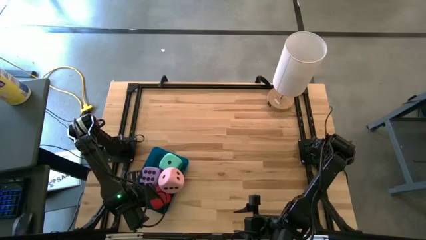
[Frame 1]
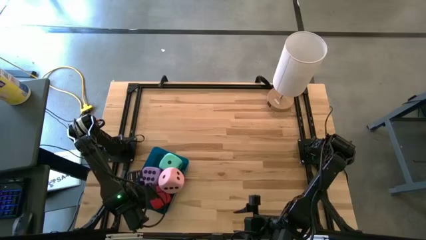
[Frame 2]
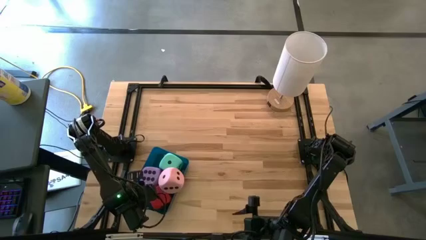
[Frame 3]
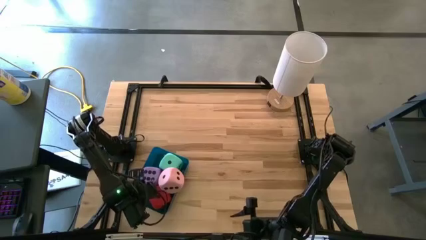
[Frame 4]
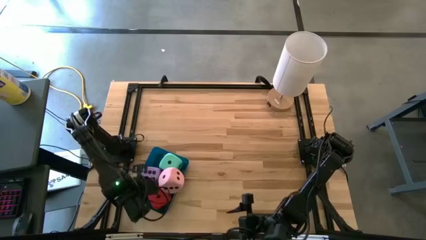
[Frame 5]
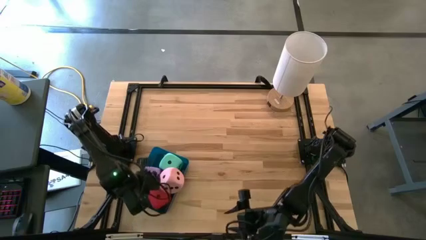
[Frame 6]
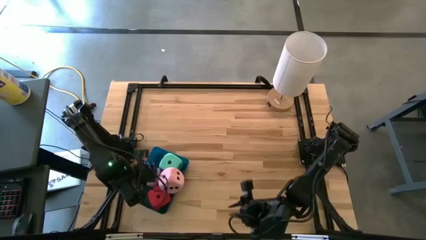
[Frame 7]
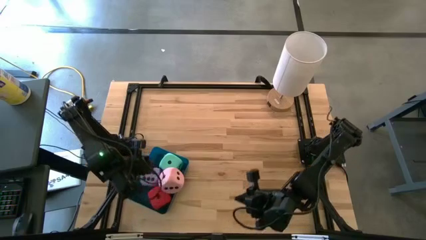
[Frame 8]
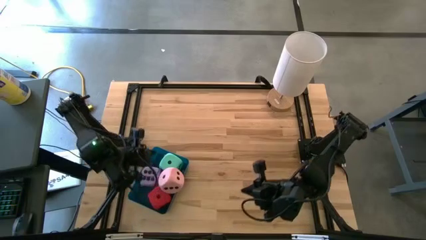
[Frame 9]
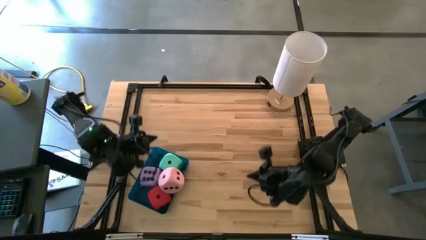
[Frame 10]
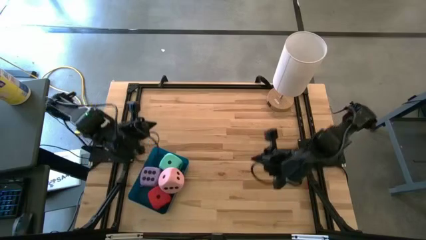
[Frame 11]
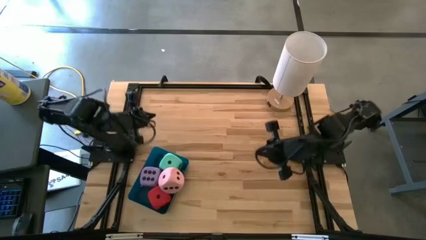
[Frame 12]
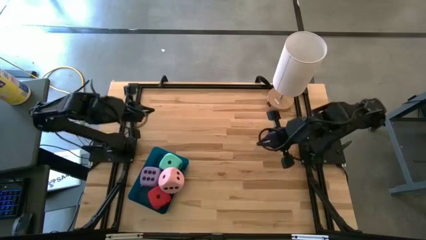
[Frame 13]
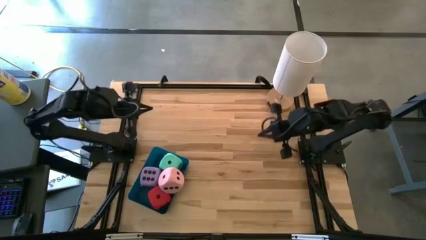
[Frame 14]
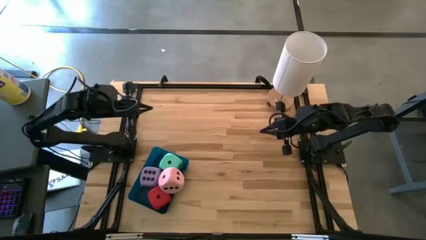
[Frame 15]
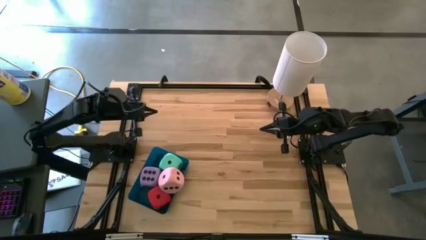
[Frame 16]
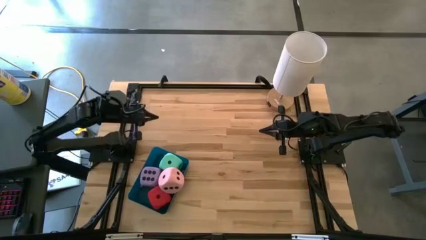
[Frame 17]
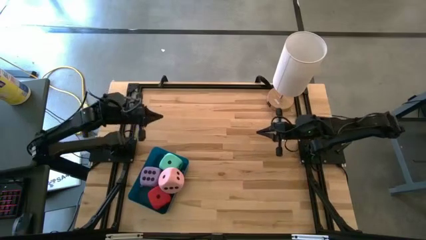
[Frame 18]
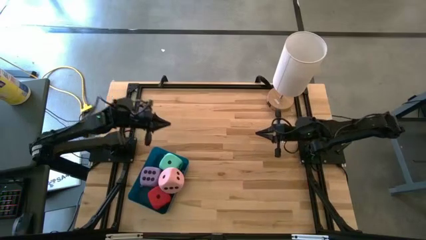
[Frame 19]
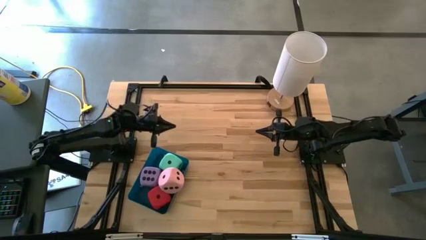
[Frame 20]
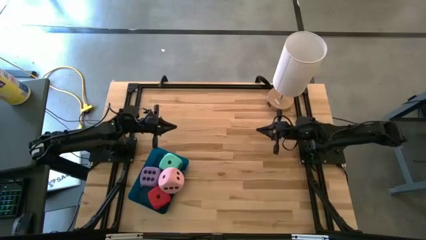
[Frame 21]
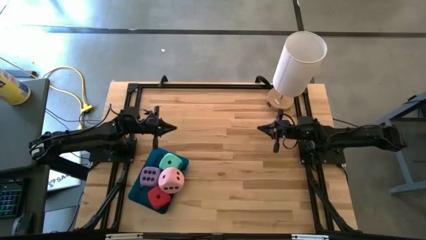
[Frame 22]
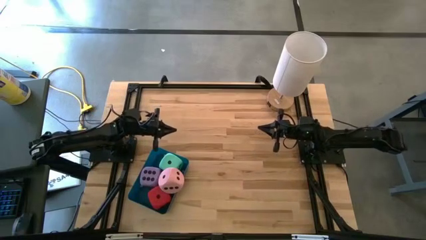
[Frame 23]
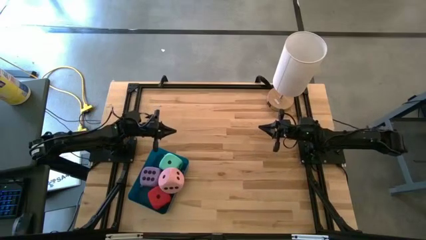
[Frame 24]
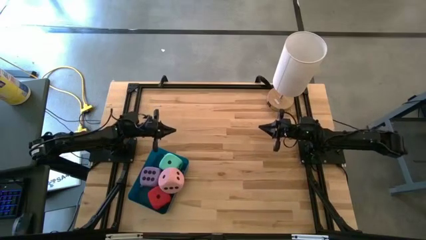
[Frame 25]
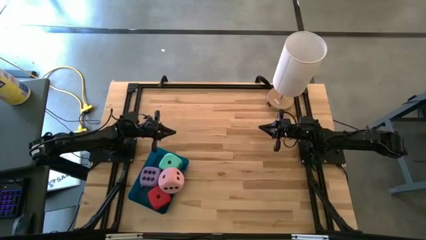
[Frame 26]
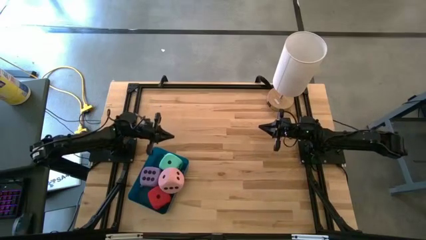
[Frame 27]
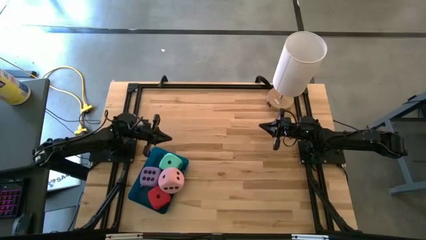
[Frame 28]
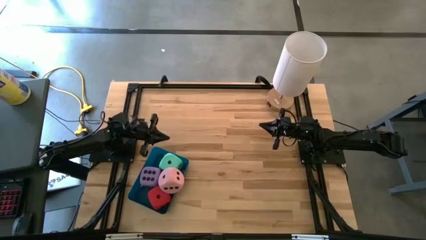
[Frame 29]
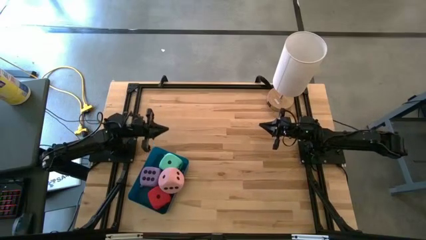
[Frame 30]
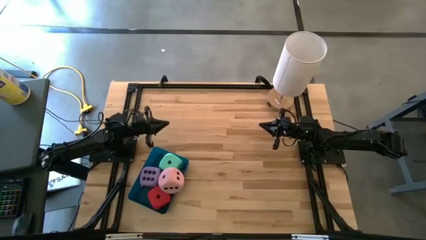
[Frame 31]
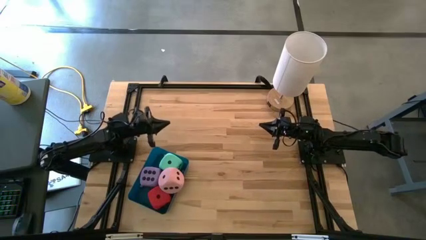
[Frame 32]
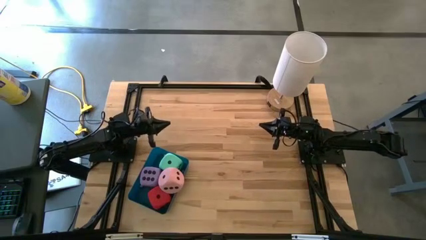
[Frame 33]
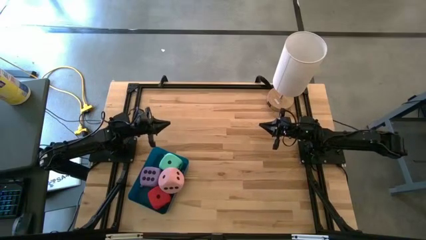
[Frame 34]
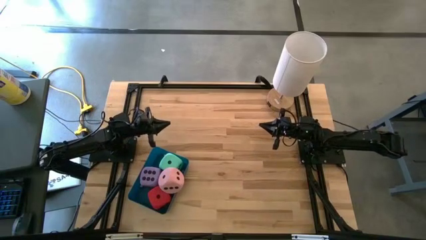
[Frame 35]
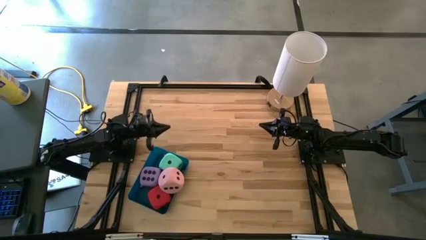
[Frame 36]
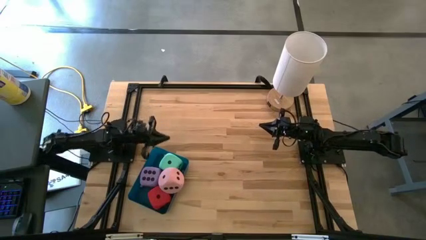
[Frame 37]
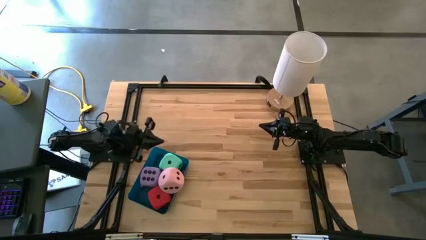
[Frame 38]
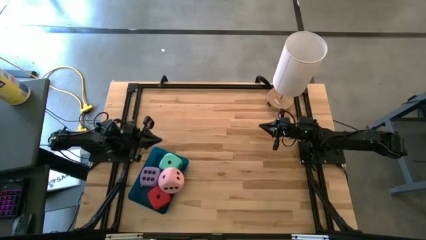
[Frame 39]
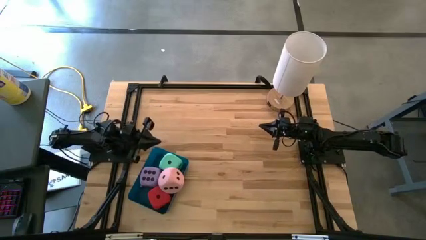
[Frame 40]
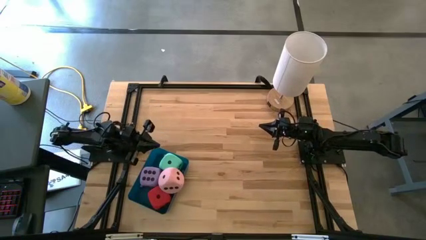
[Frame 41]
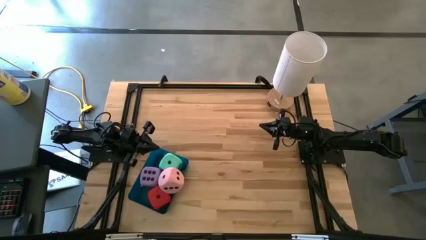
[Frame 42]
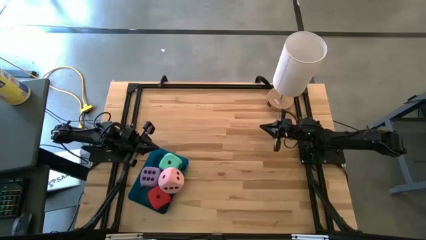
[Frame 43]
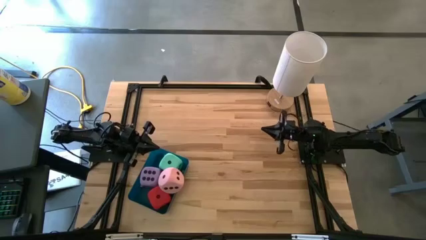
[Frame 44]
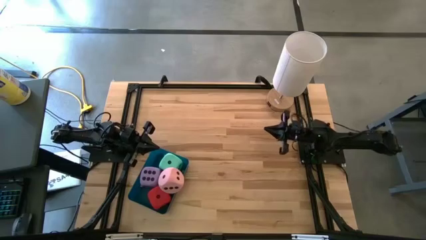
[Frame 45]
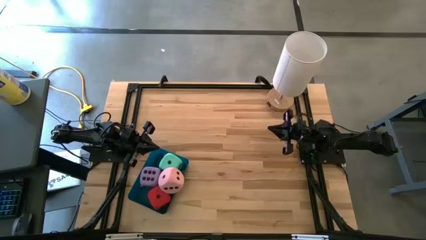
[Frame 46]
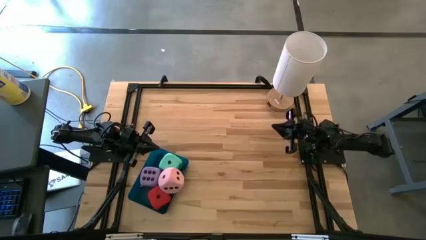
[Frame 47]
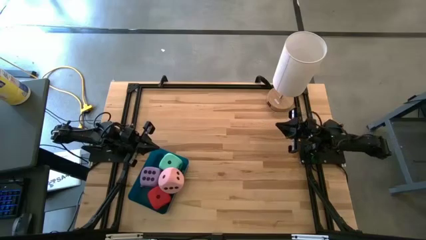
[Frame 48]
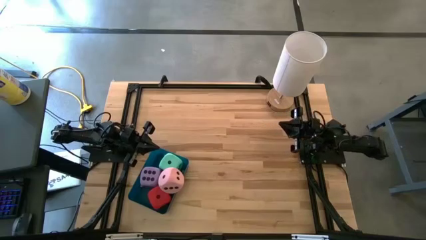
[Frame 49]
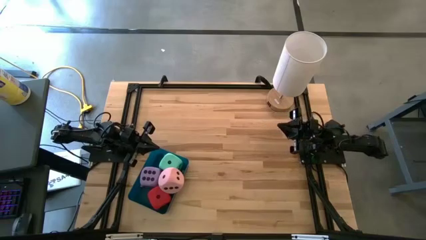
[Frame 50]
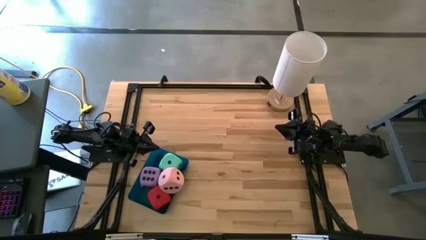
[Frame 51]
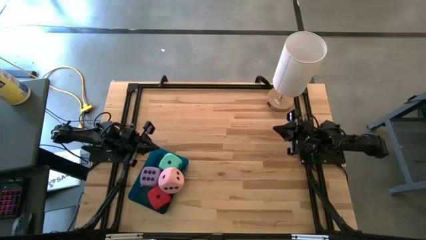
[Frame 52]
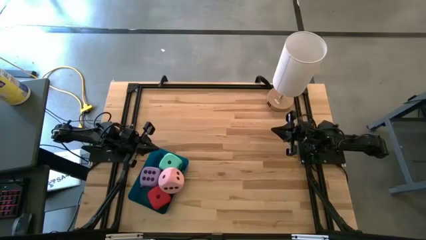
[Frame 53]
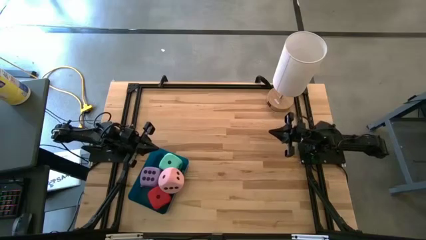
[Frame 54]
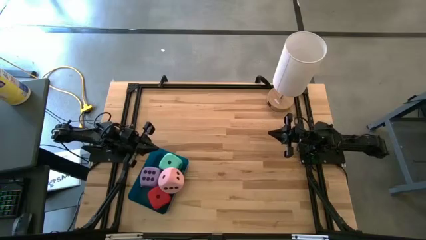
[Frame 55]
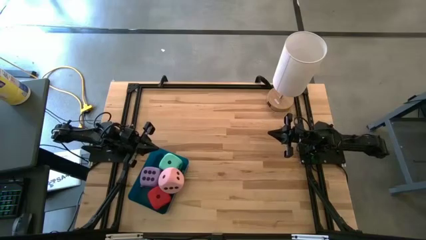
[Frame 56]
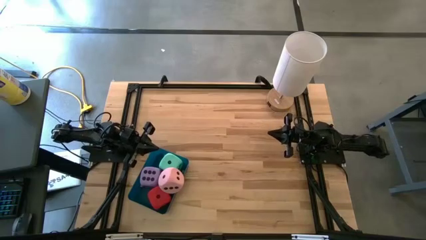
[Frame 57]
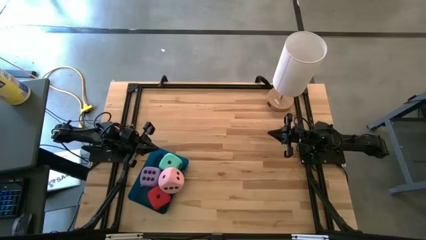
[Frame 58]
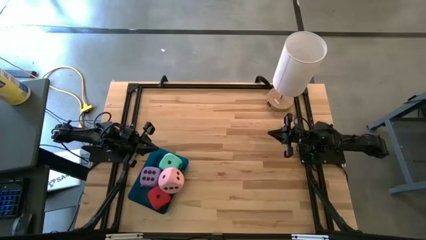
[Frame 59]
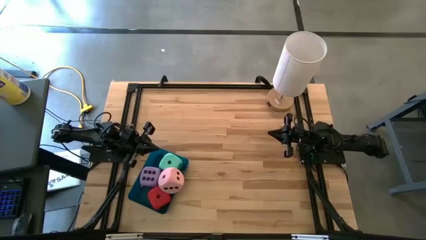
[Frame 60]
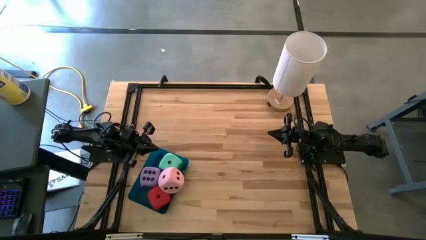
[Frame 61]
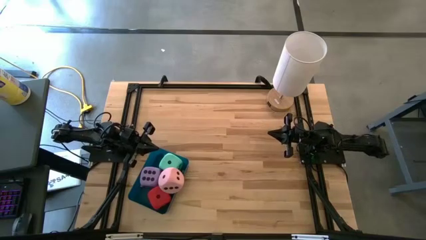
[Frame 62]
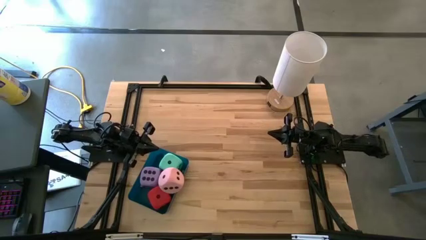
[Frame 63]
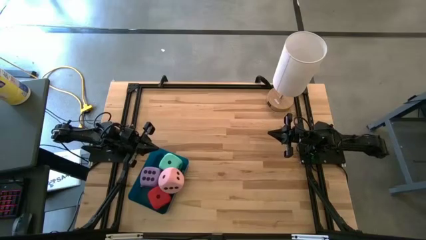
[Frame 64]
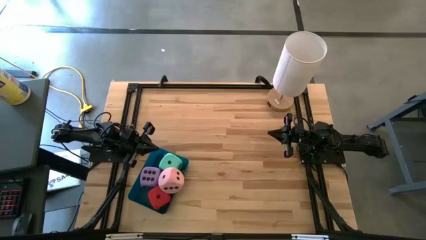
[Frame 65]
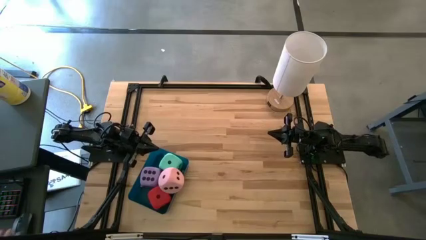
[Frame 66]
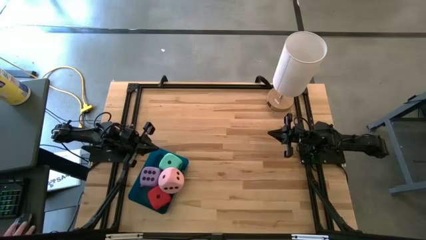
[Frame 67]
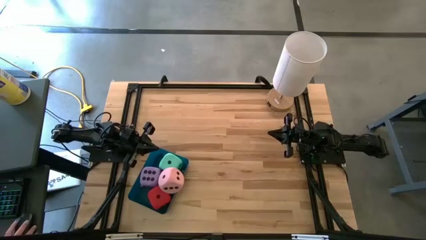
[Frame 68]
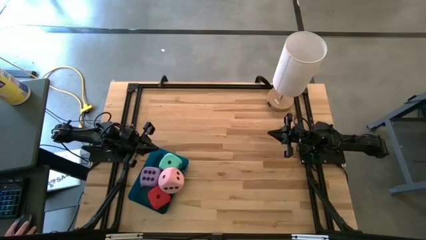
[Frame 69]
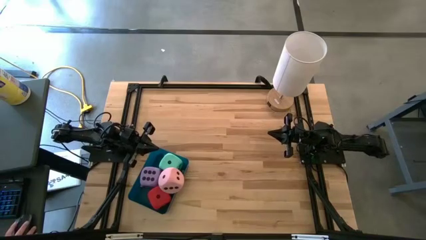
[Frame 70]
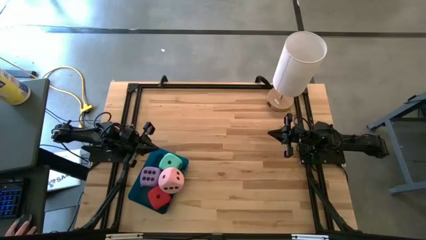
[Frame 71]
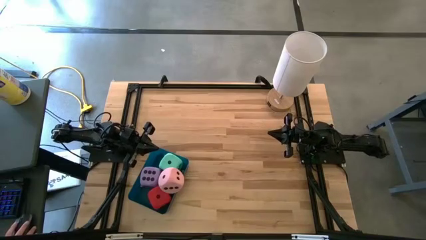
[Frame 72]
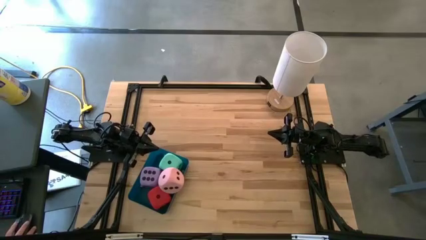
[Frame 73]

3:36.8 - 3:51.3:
Task: Pick & Place Dice
Return to Home Position
